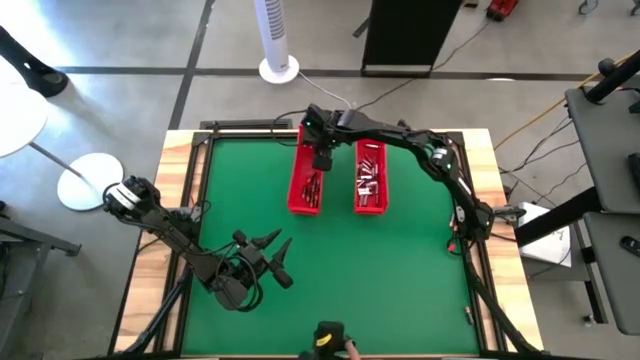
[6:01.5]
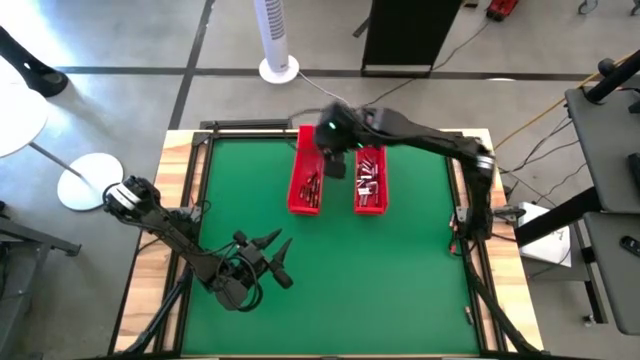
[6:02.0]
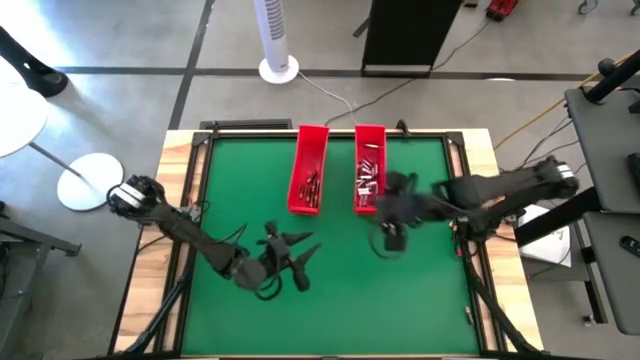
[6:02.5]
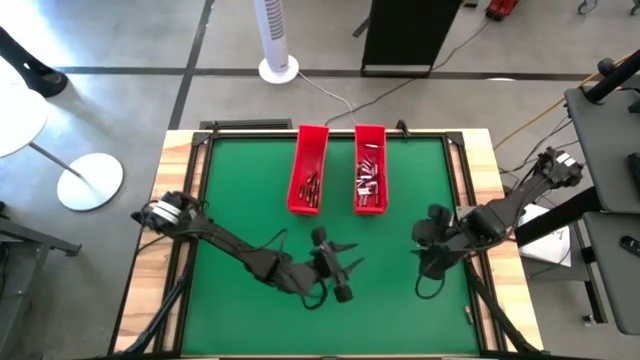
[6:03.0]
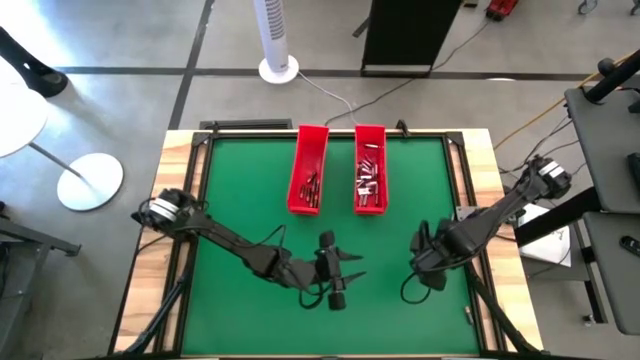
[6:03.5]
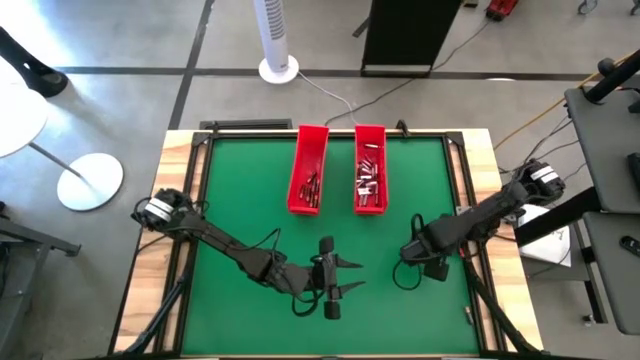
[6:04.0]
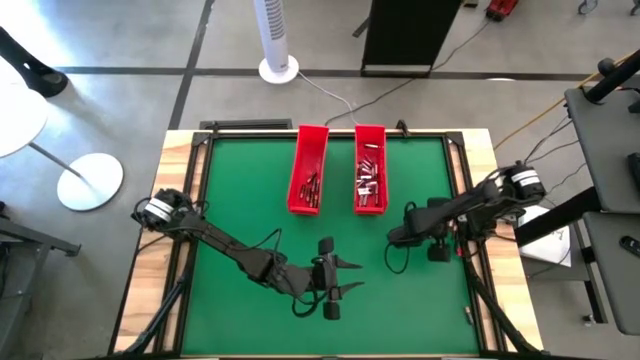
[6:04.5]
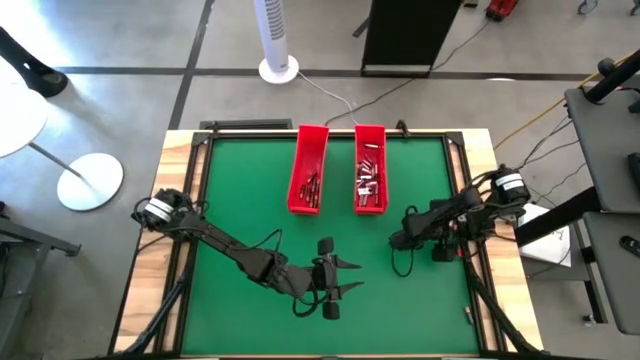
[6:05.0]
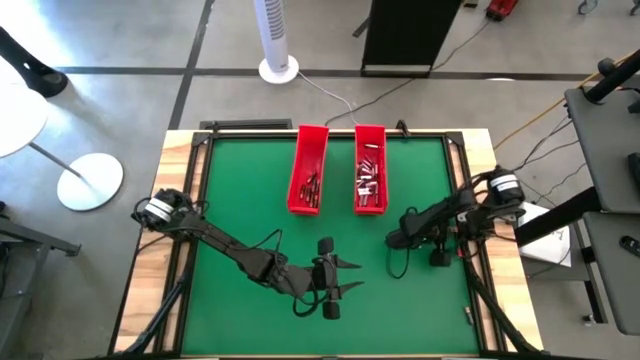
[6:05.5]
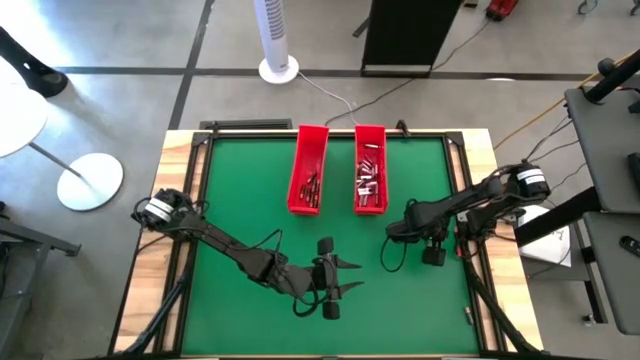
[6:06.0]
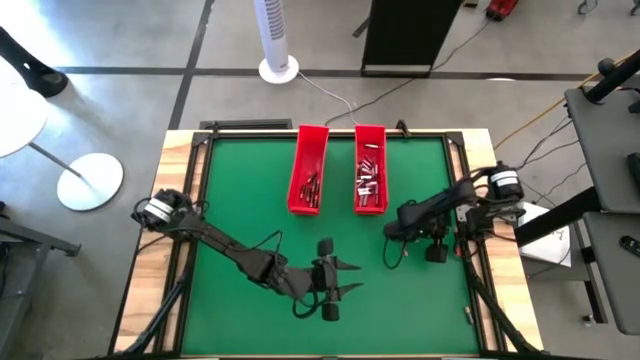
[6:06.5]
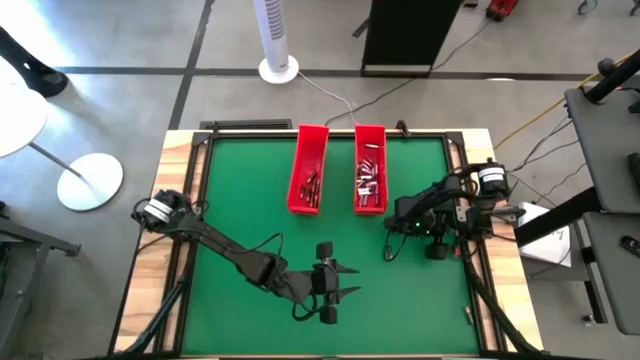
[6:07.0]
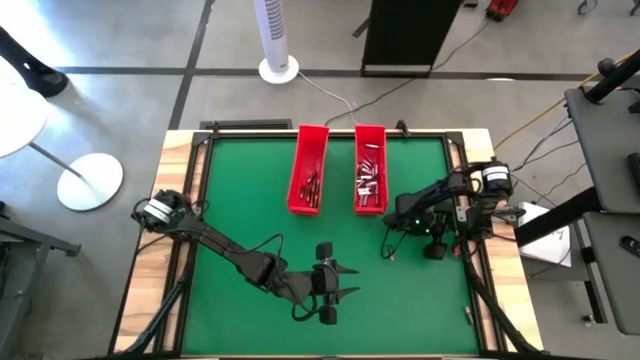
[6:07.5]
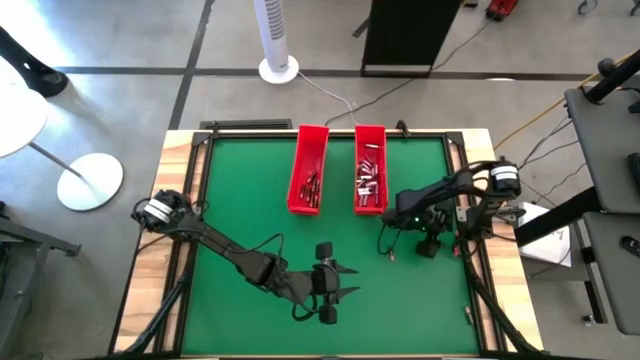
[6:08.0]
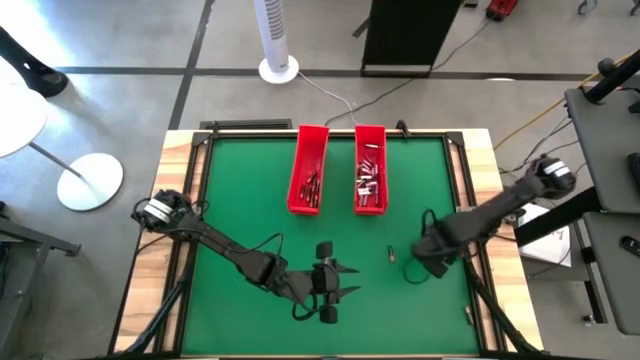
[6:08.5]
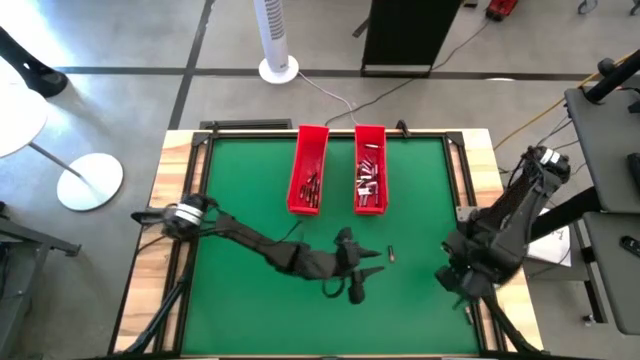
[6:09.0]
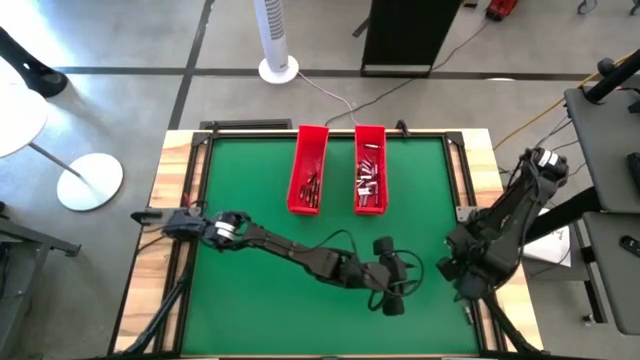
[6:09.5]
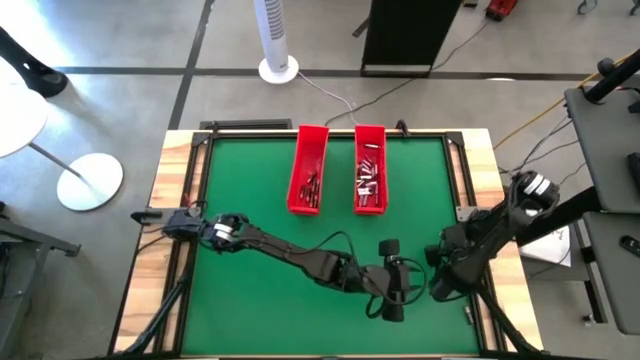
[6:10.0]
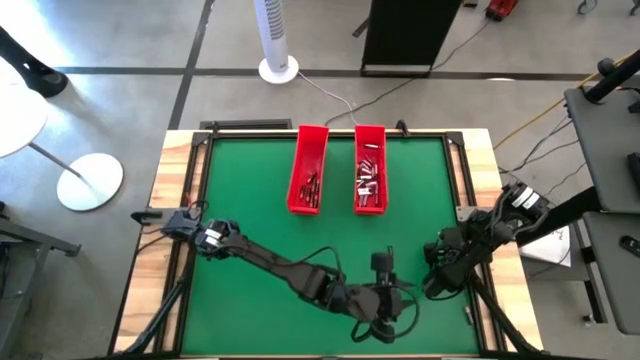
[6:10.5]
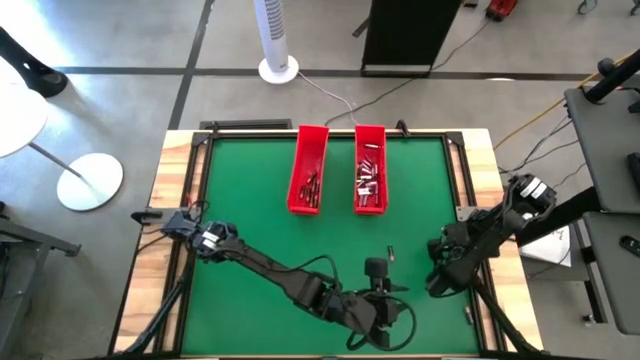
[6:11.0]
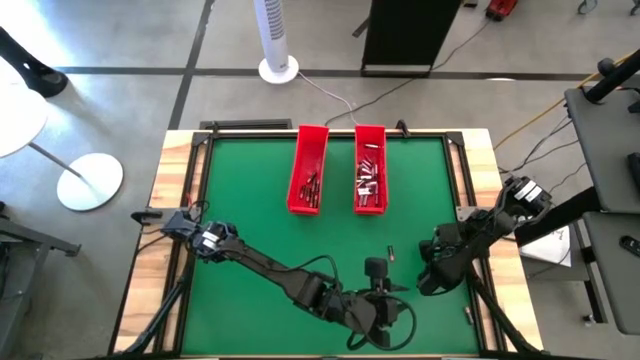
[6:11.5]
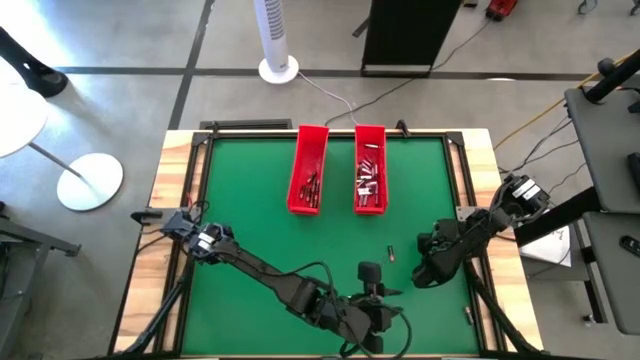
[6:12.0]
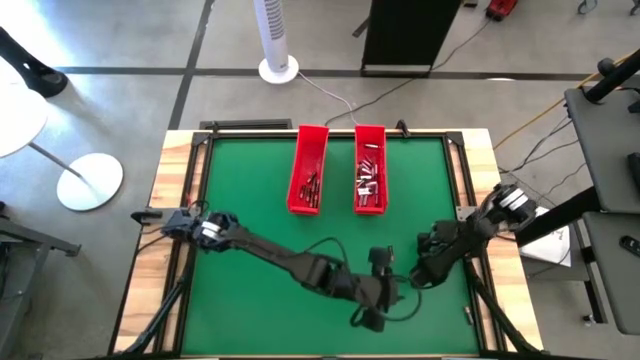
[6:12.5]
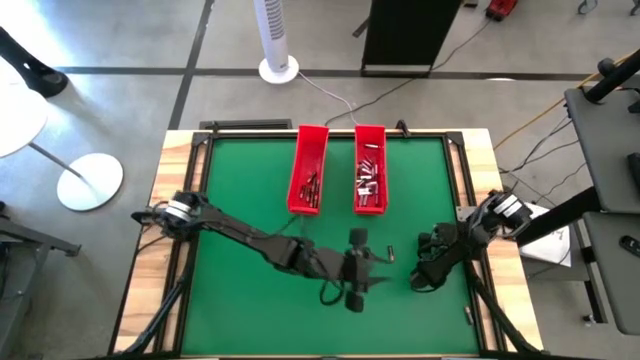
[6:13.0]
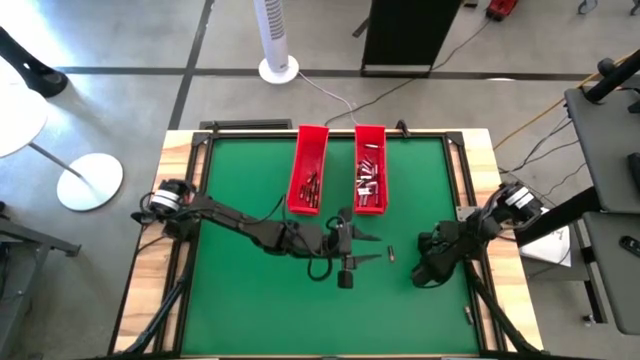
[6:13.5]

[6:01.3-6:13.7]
Task: Sort batteries
Put the black battery into the left red bin

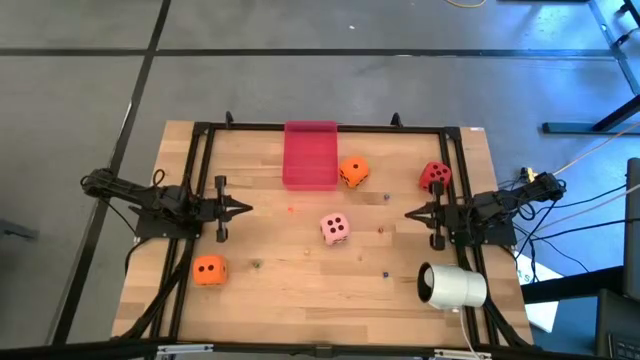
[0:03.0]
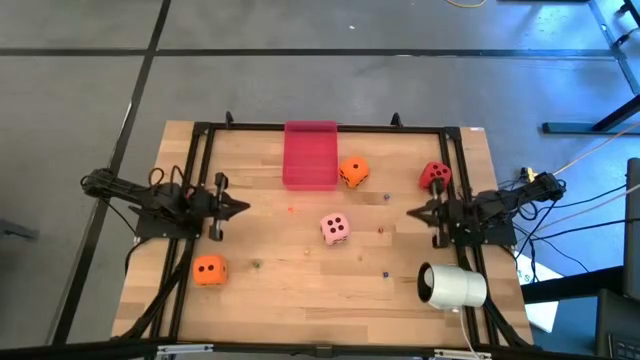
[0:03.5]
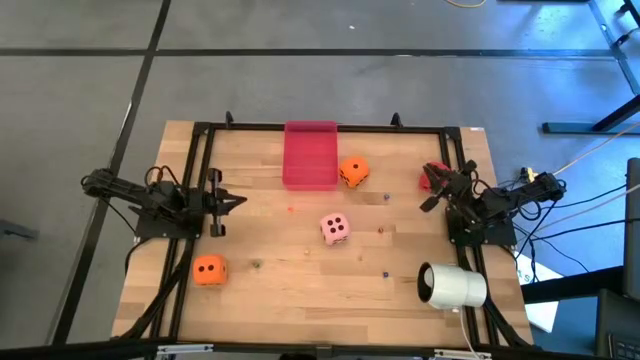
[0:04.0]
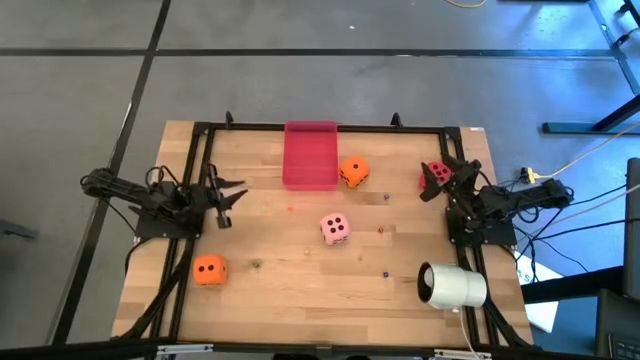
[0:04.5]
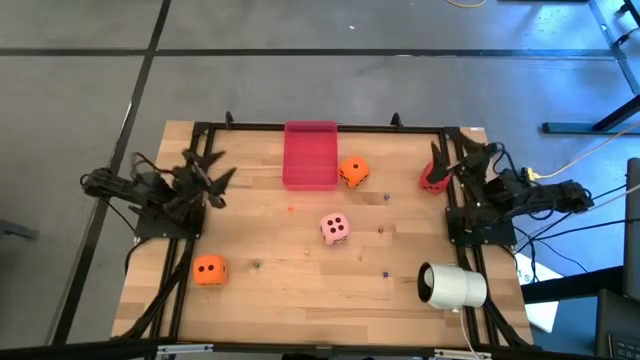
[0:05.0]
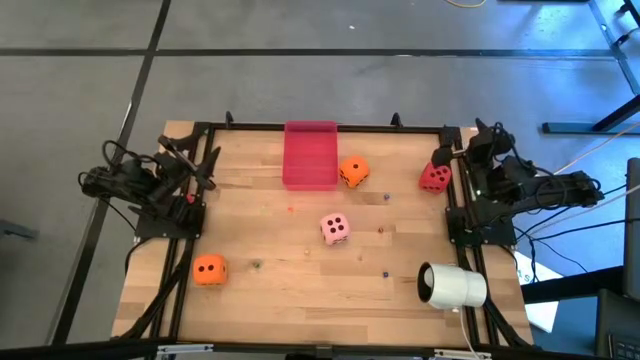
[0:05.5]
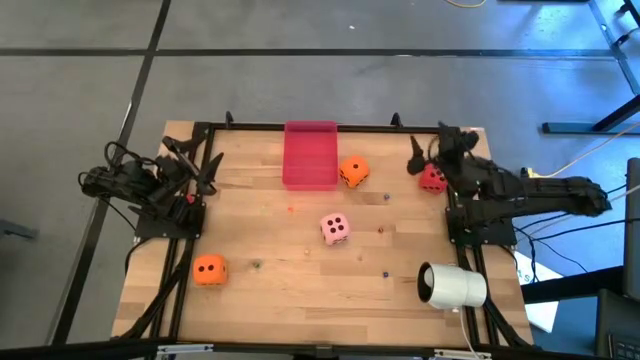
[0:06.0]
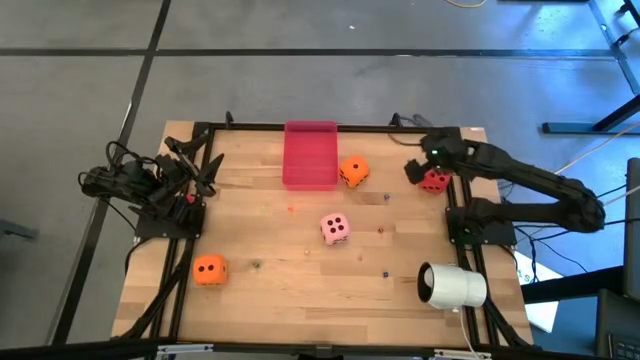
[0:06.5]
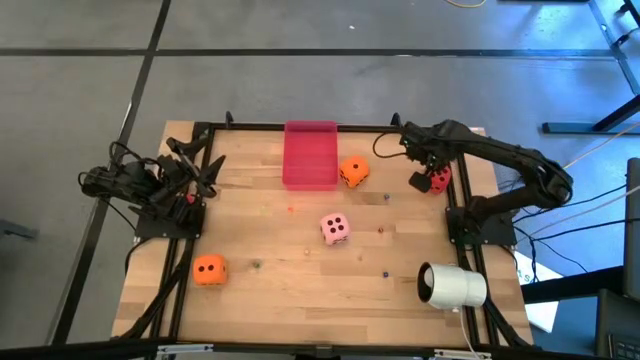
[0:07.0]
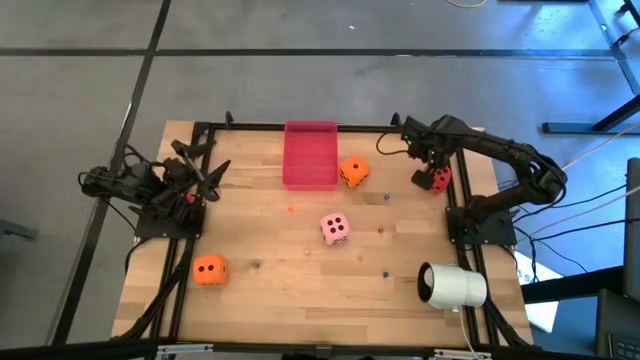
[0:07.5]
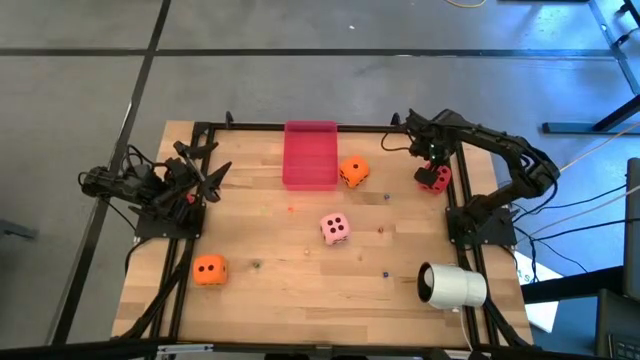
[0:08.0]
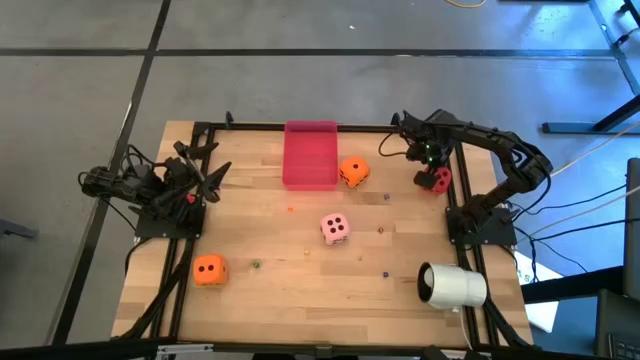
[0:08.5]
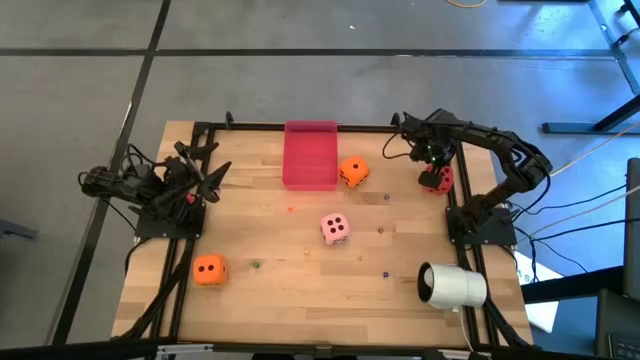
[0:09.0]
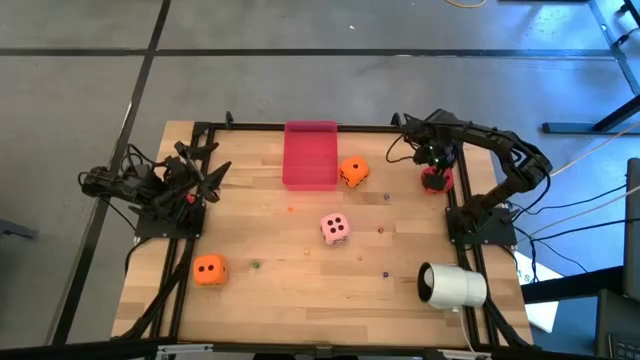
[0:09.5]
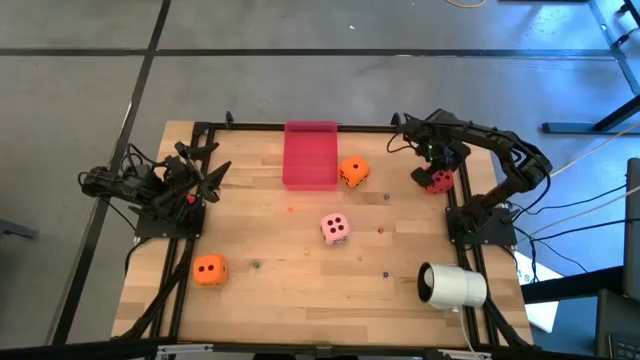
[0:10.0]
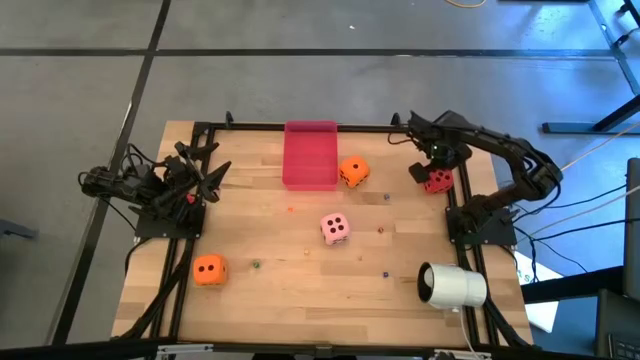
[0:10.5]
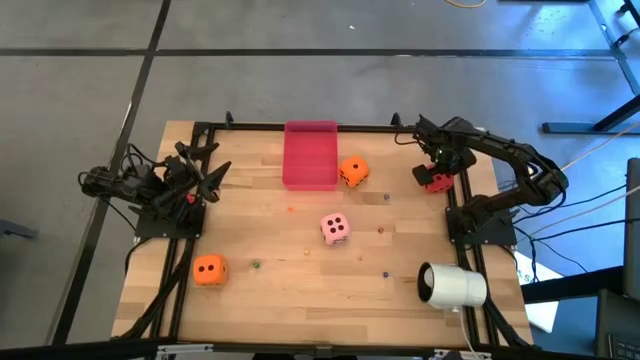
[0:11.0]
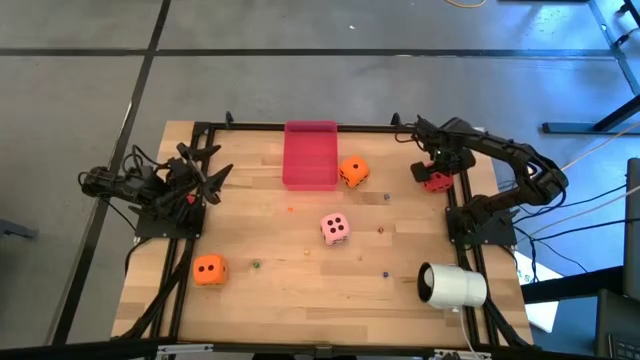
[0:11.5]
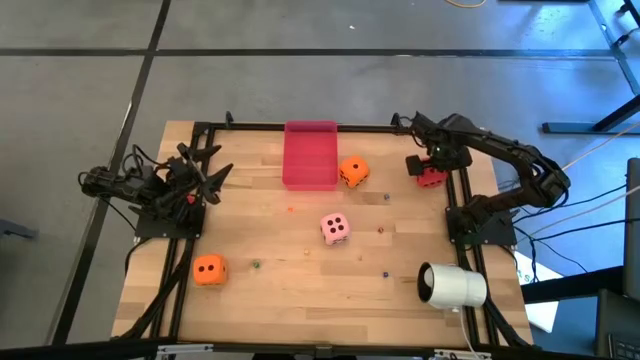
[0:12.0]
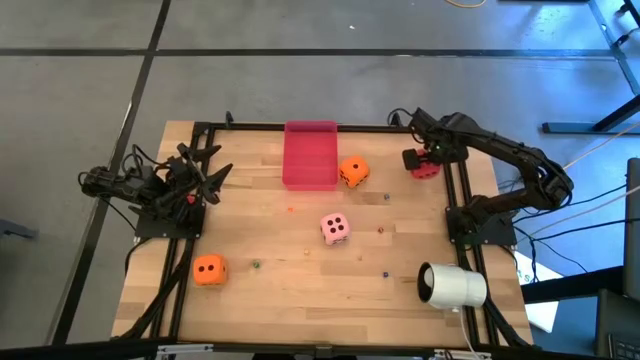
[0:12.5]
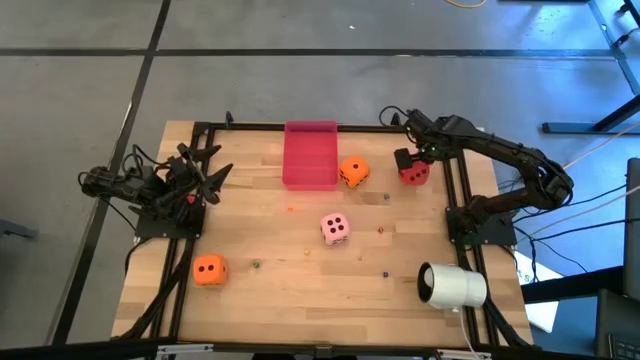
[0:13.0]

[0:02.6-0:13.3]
Task: Pick & Place Dice
Put the large red dice into the bin
